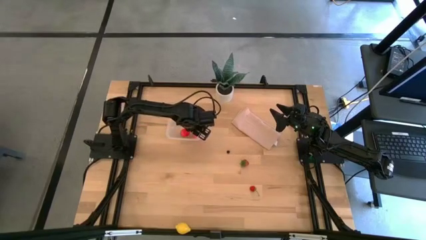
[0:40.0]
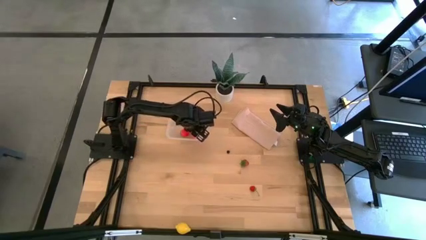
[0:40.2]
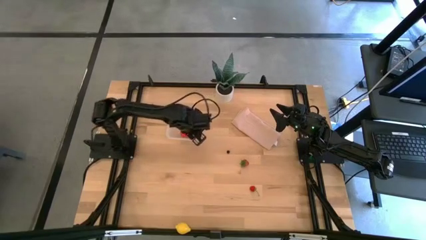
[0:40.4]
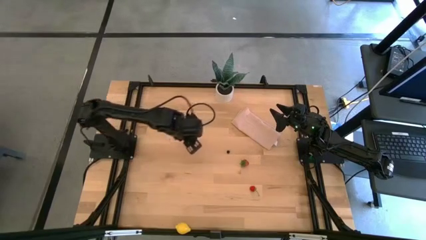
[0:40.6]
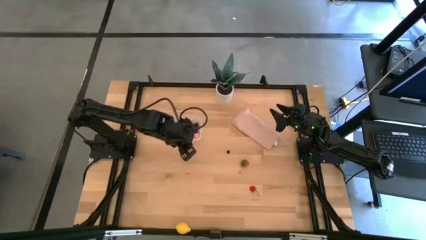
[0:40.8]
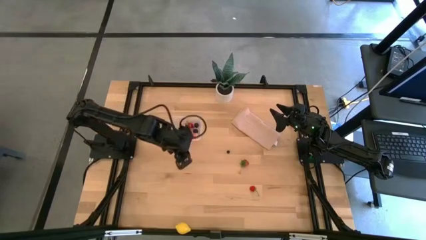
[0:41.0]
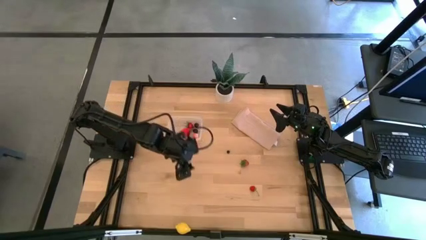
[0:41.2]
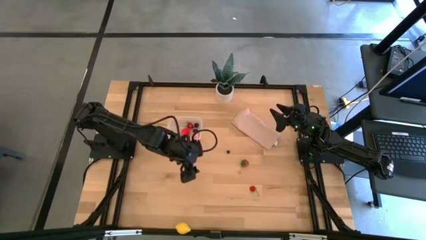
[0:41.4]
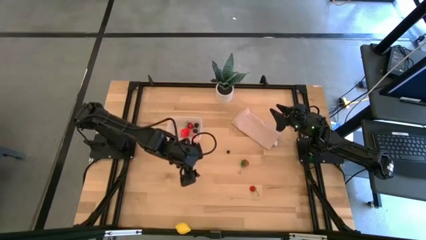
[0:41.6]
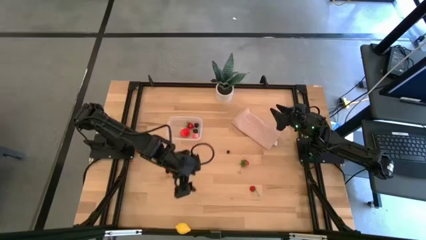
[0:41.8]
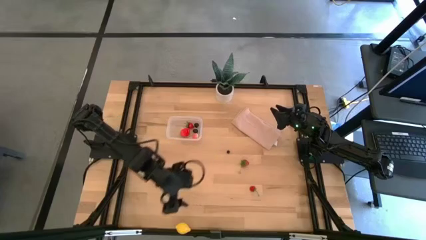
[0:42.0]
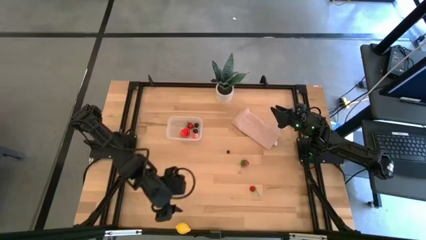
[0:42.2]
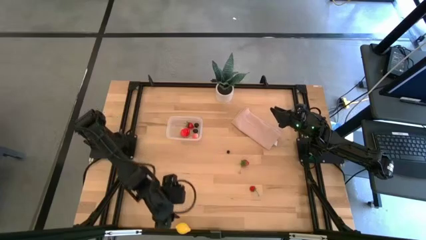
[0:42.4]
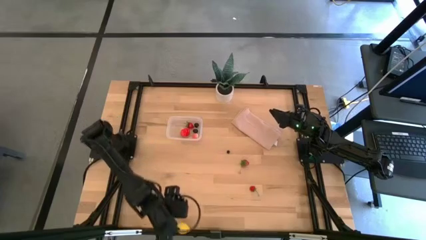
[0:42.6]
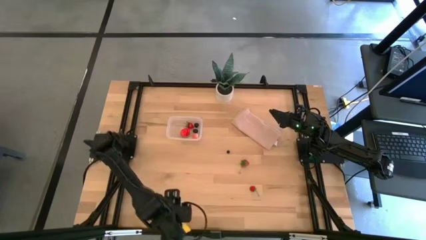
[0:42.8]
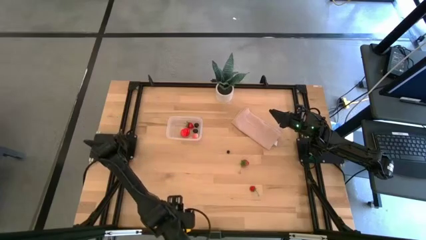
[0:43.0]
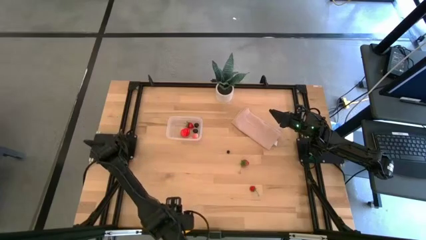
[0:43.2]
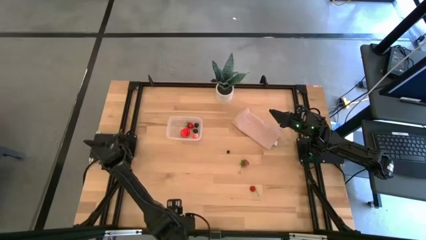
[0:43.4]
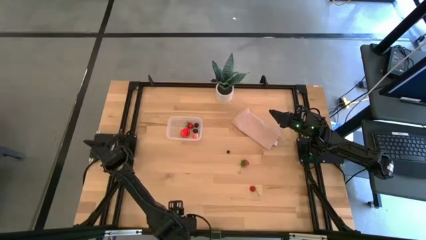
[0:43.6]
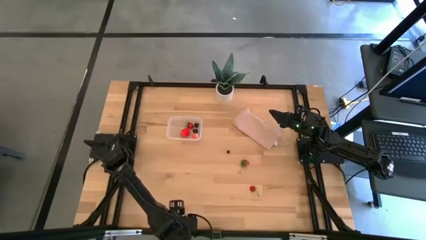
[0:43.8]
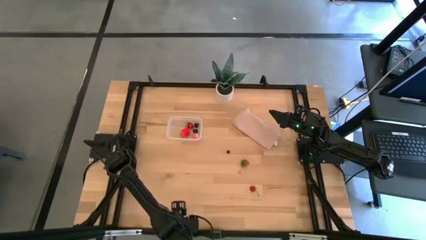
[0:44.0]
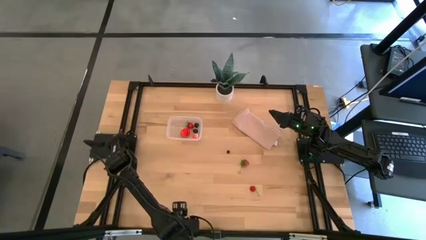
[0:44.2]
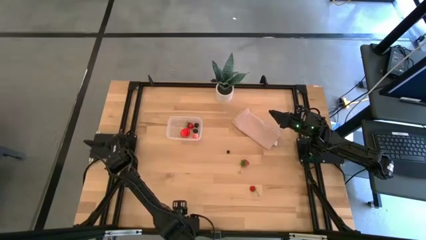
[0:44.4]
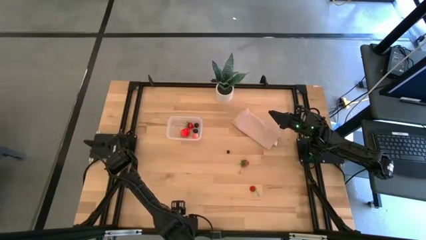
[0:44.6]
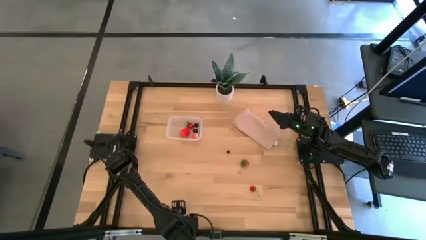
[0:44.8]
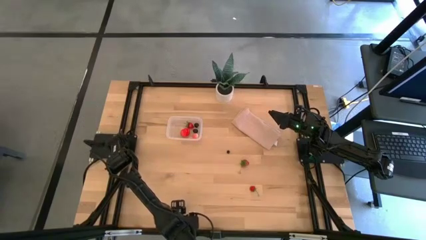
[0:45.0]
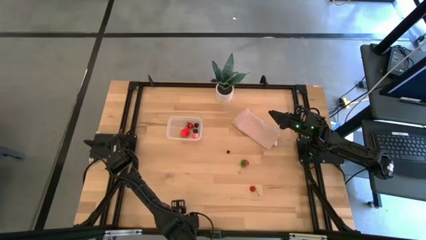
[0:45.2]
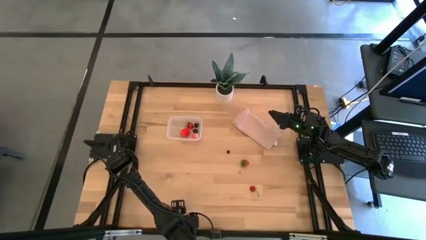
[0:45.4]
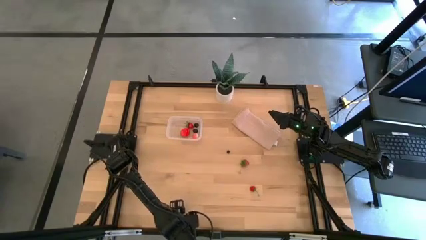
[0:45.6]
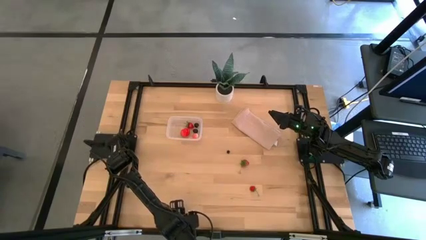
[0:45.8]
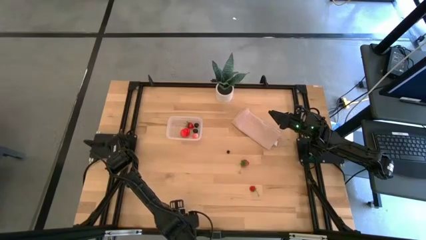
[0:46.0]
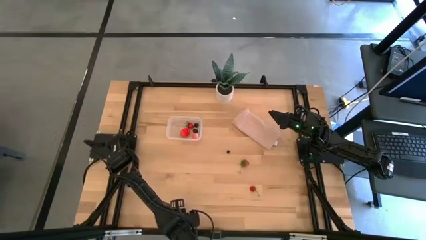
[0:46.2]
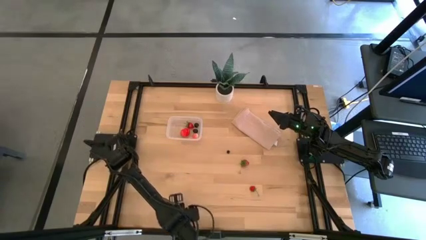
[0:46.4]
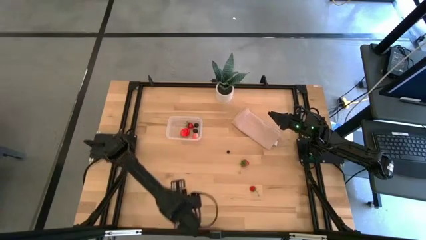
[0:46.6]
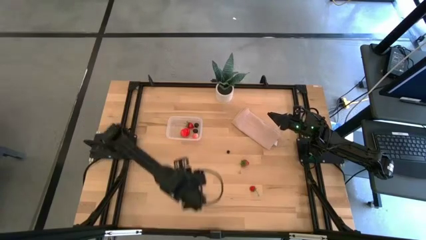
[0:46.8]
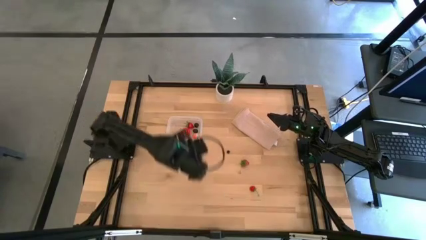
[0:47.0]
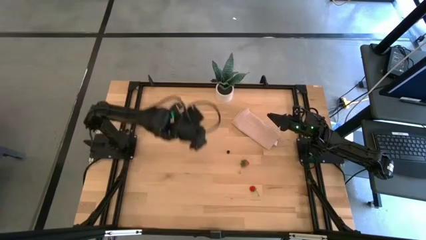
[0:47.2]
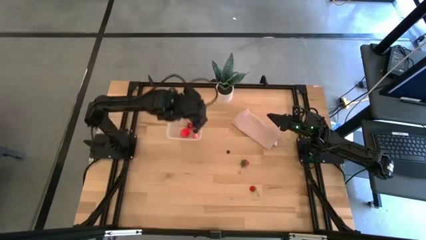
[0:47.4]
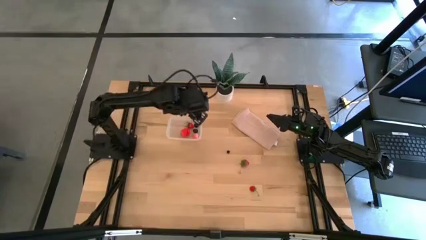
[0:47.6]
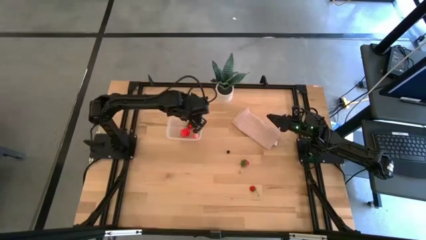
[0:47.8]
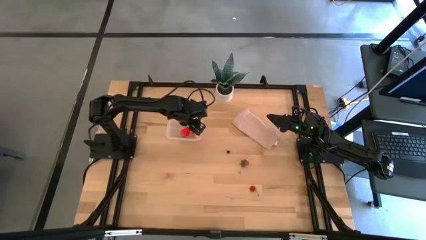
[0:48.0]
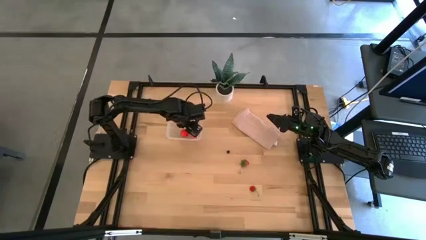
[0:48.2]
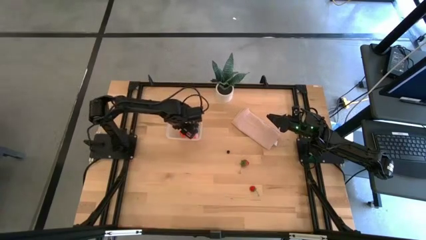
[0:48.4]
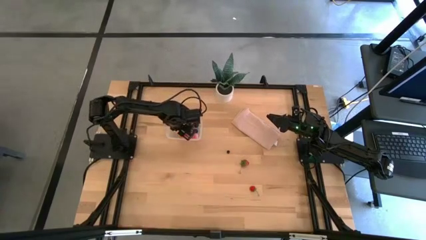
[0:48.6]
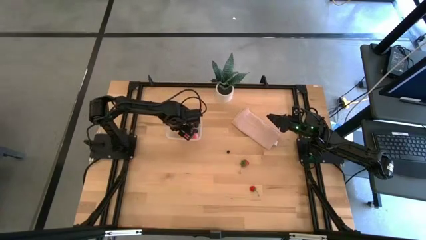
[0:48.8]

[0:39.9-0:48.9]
Task: Pick and placing Produce into tupperware
Put the yellow lemon into the transparent container

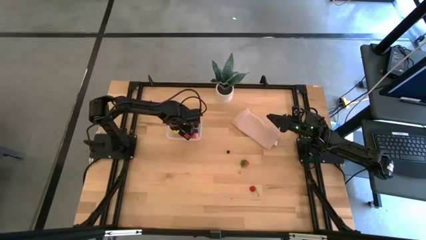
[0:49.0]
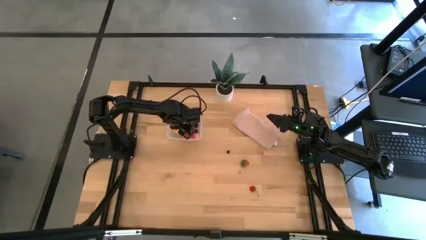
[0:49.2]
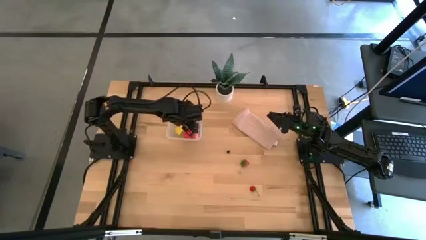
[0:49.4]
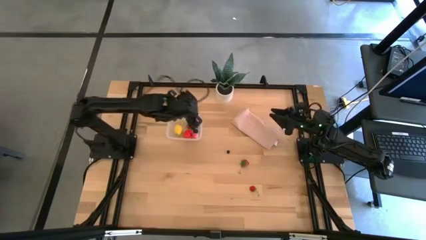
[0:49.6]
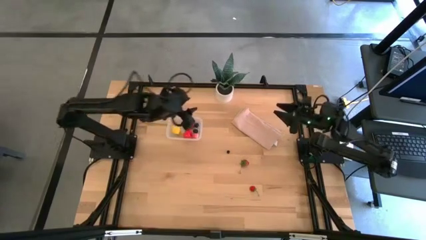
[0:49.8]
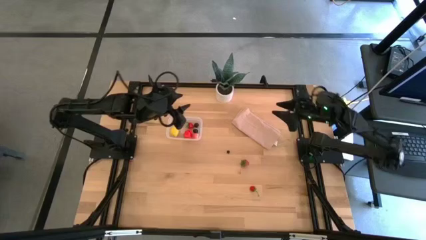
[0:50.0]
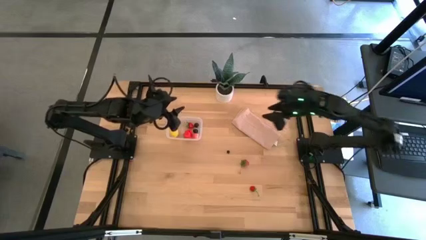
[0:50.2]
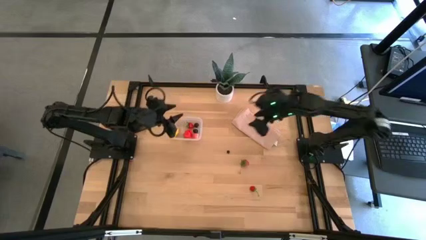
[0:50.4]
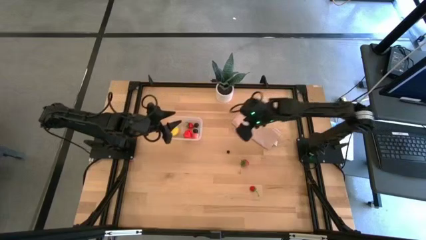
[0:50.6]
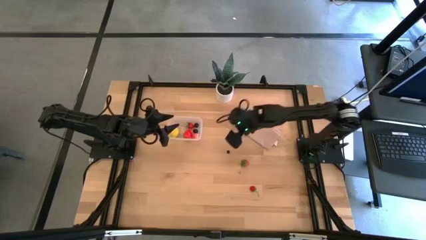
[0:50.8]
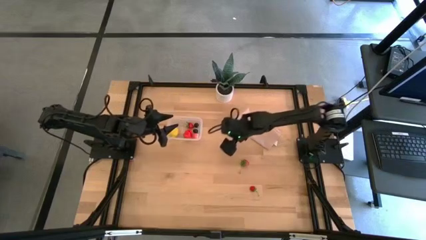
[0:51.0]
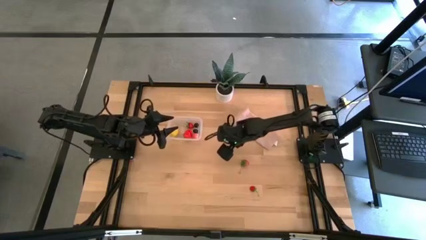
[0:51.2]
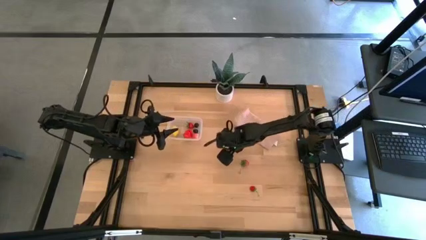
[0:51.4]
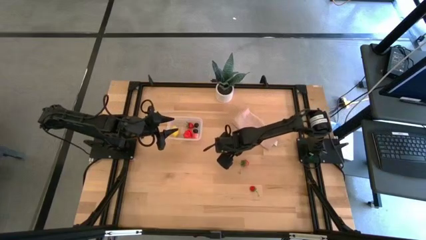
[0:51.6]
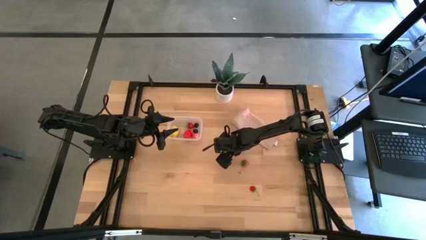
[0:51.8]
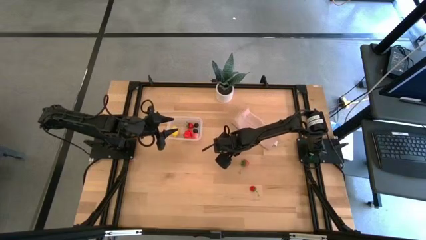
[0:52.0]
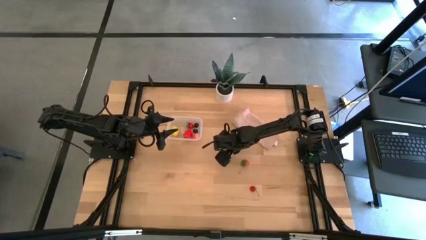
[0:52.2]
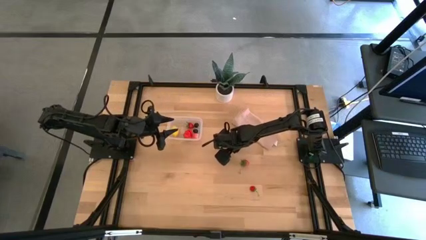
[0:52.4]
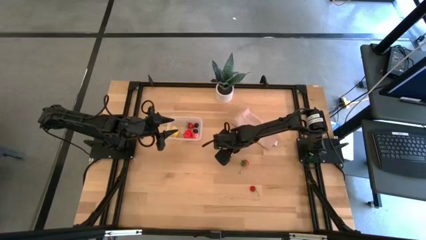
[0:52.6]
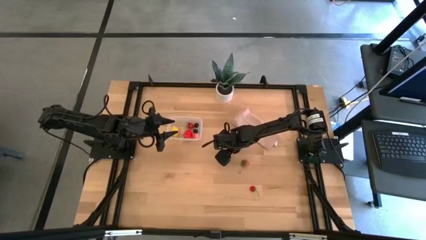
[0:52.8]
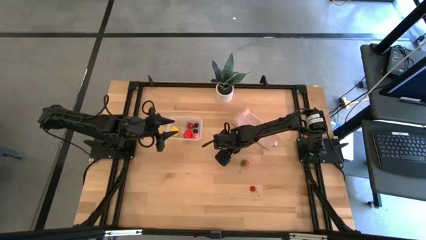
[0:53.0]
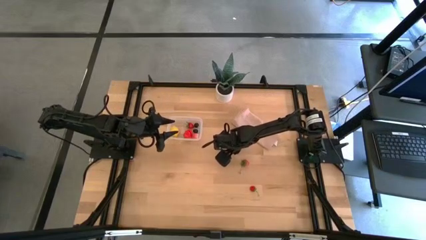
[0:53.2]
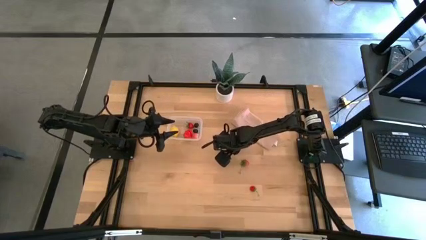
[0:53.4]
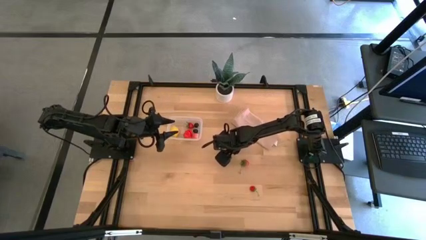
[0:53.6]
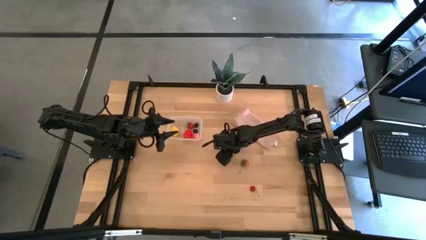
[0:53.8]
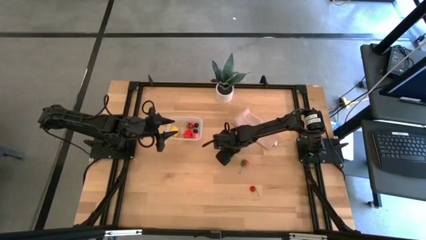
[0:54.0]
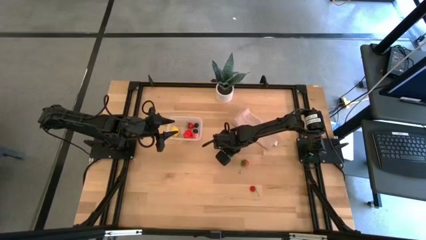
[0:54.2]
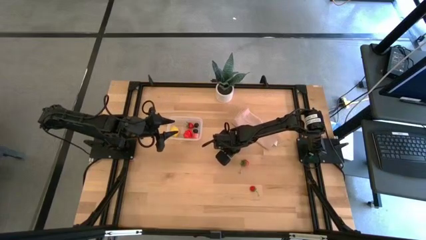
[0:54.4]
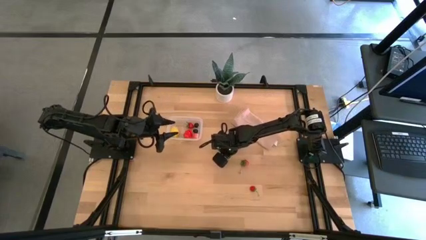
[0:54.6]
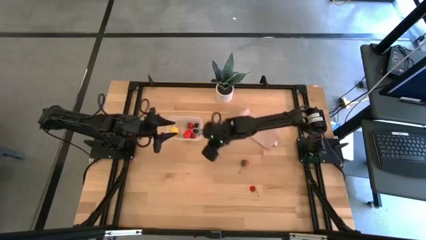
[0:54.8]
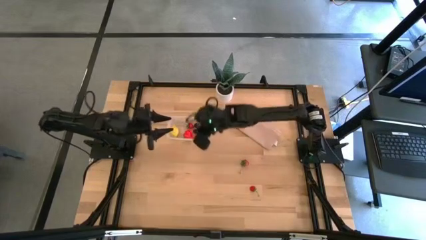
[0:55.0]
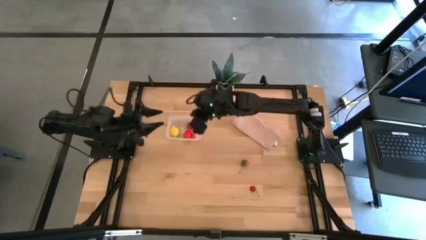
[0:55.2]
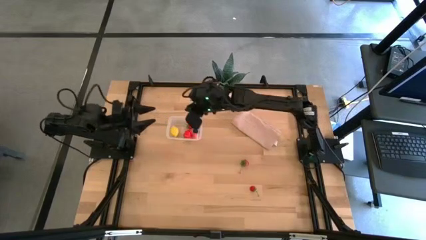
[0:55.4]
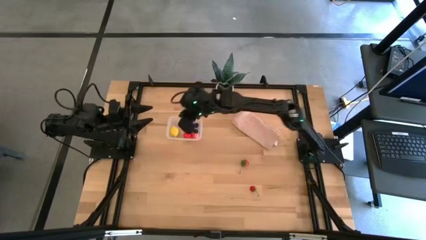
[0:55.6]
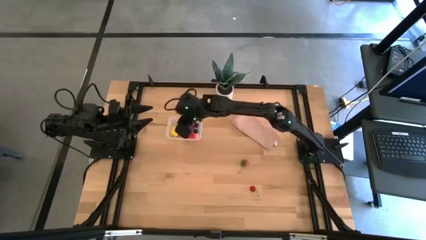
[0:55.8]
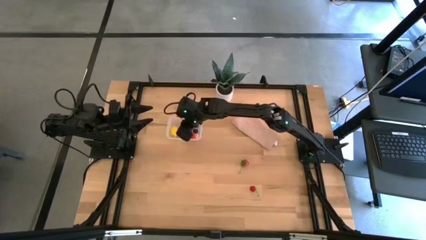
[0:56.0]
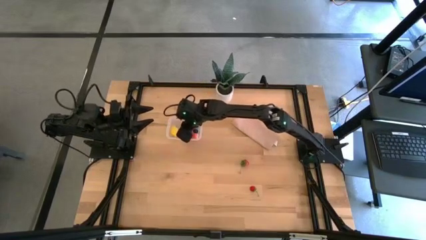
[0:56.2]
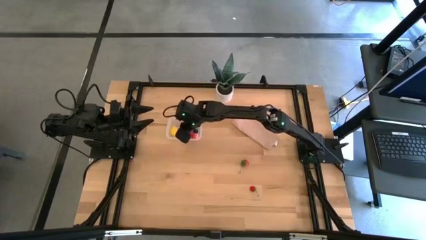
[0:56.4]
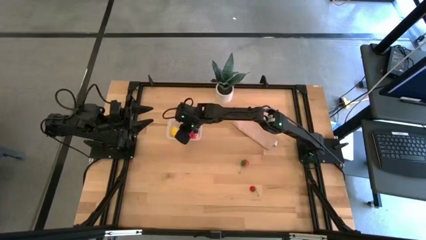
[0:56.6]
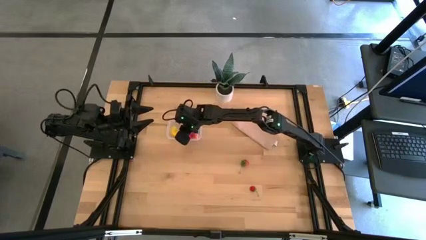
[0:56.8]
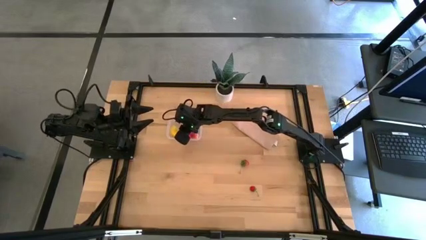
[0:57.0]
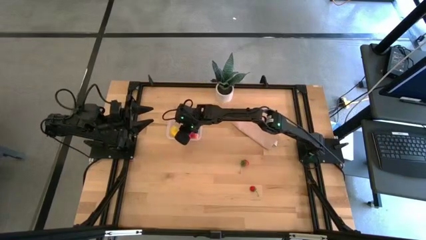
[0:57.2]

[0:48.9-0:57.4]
Put the blueberry into the transparent container
